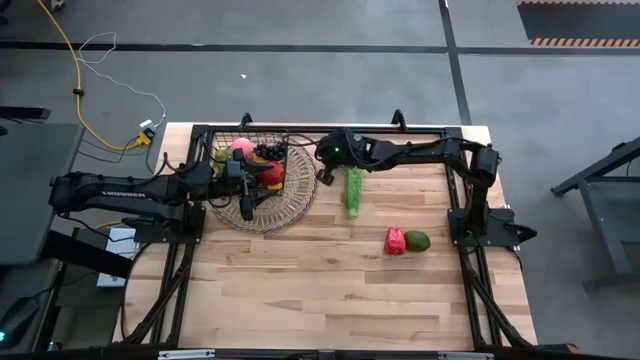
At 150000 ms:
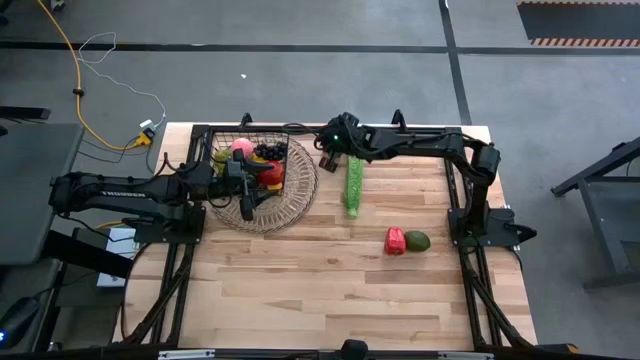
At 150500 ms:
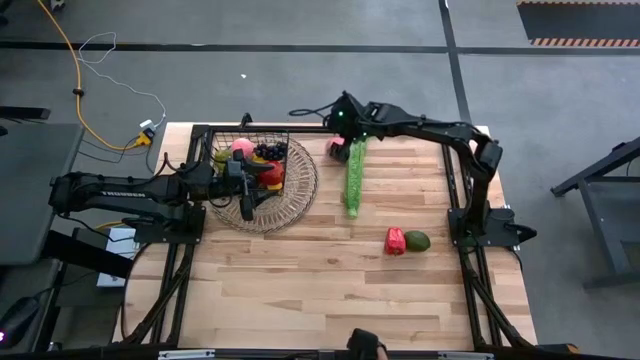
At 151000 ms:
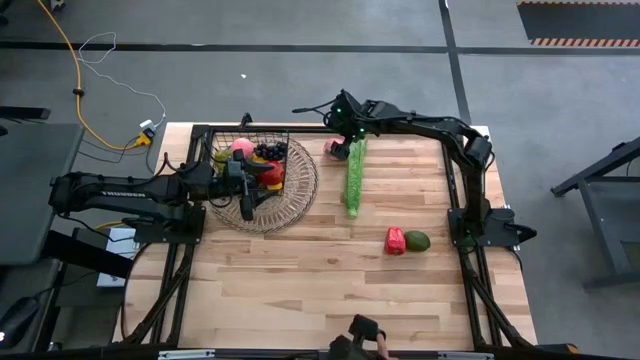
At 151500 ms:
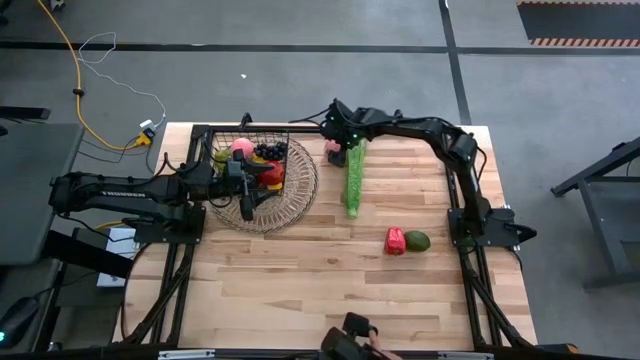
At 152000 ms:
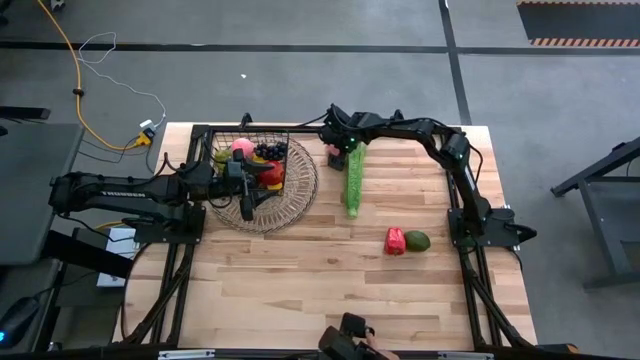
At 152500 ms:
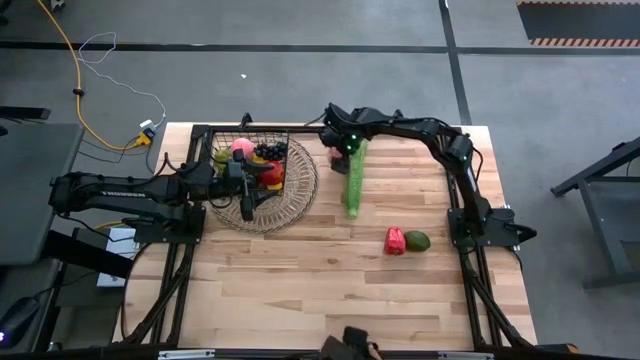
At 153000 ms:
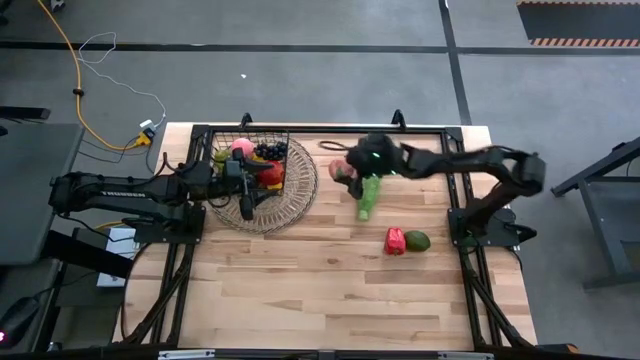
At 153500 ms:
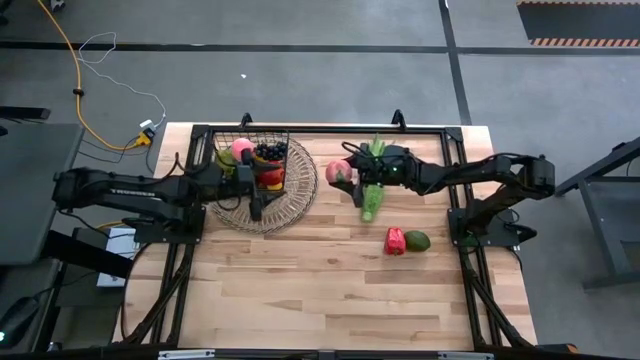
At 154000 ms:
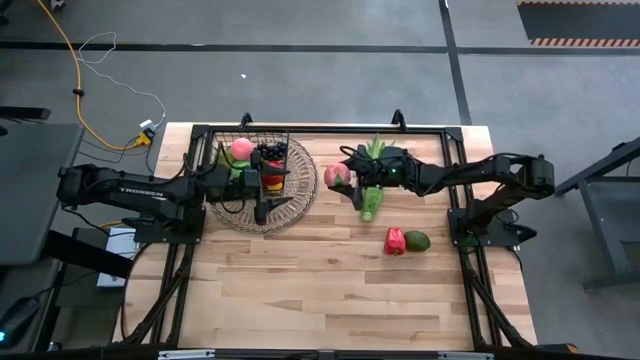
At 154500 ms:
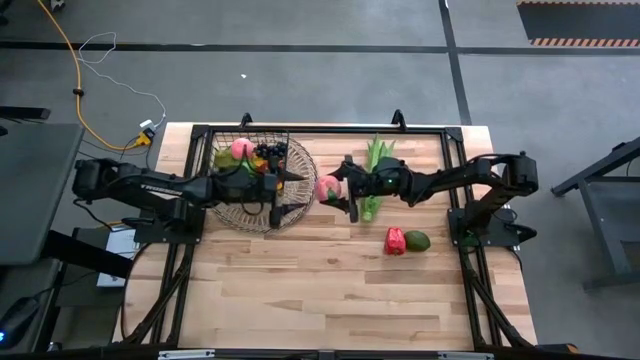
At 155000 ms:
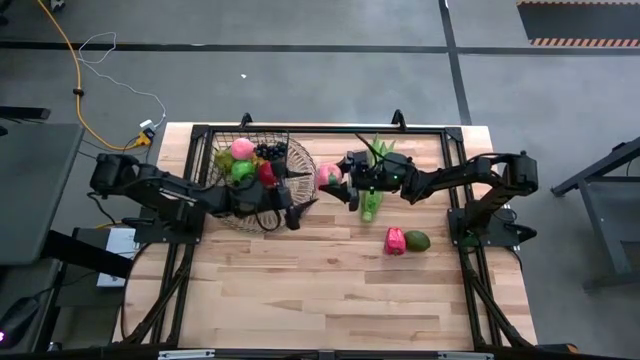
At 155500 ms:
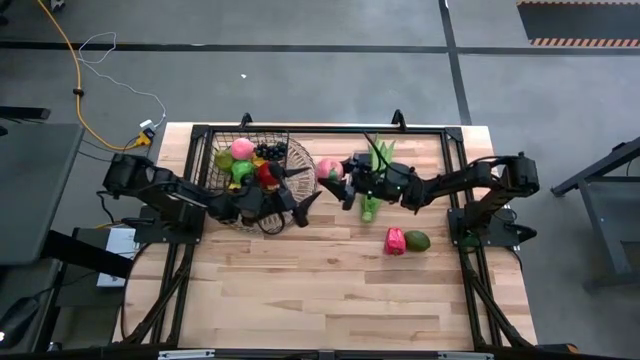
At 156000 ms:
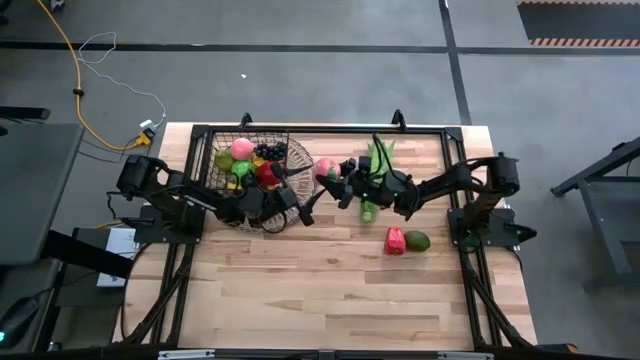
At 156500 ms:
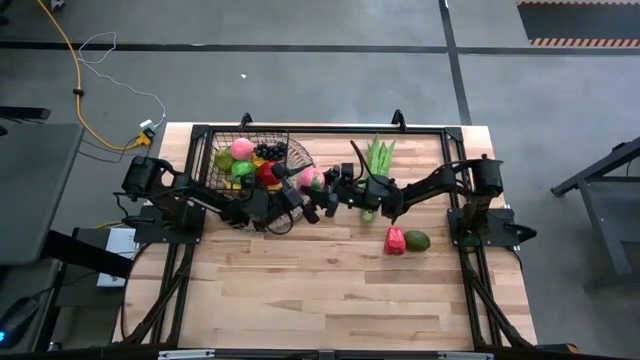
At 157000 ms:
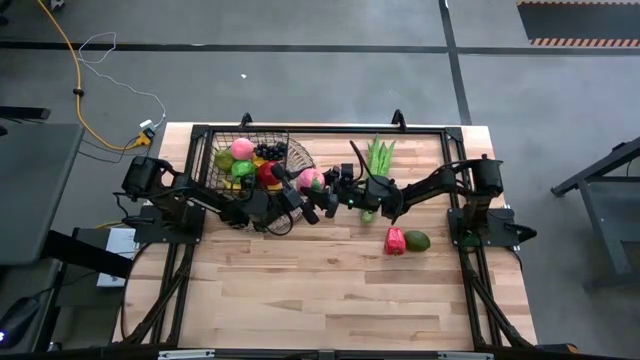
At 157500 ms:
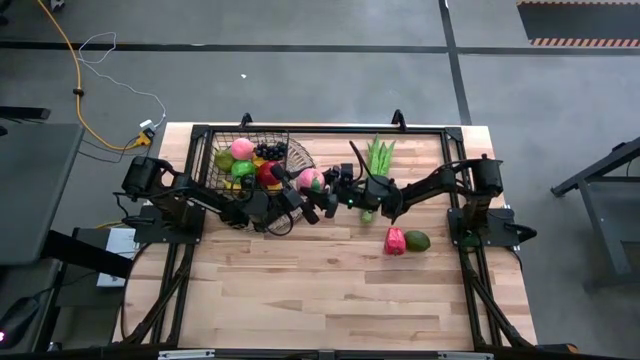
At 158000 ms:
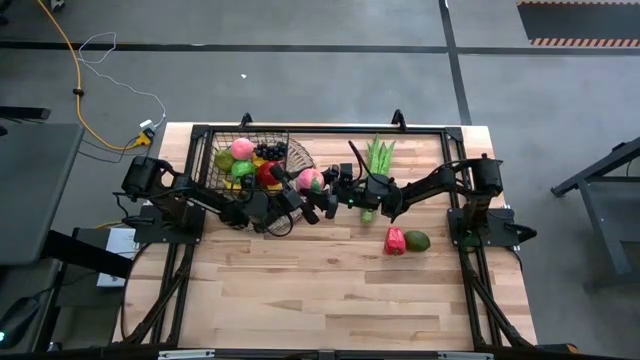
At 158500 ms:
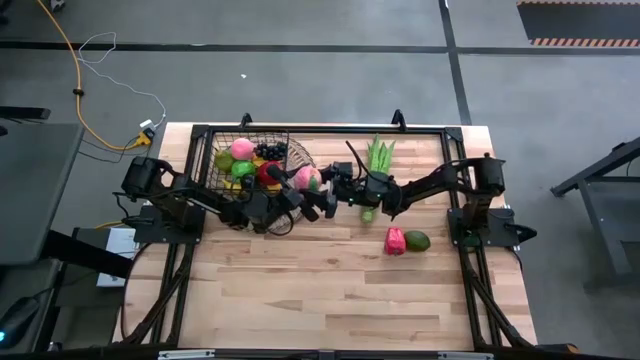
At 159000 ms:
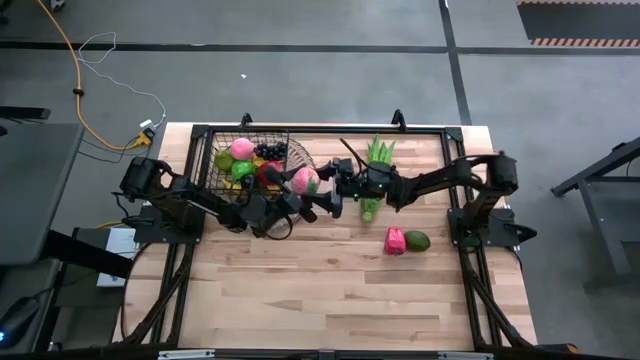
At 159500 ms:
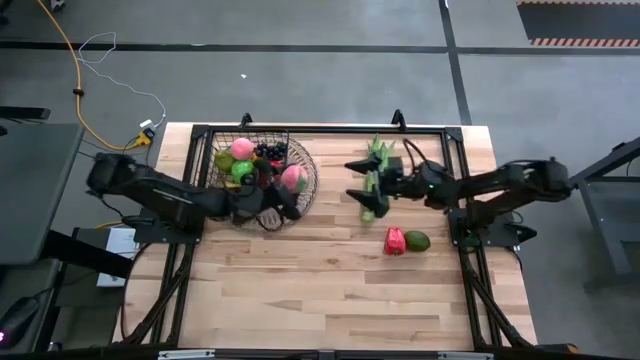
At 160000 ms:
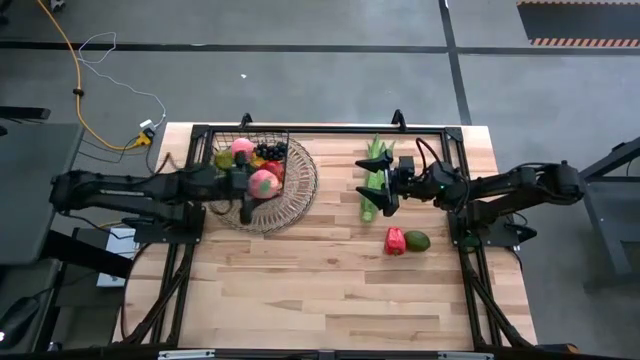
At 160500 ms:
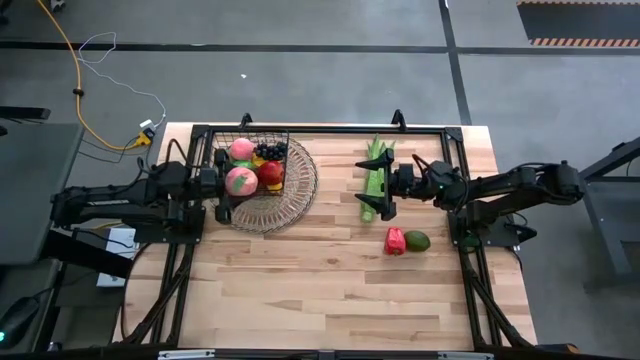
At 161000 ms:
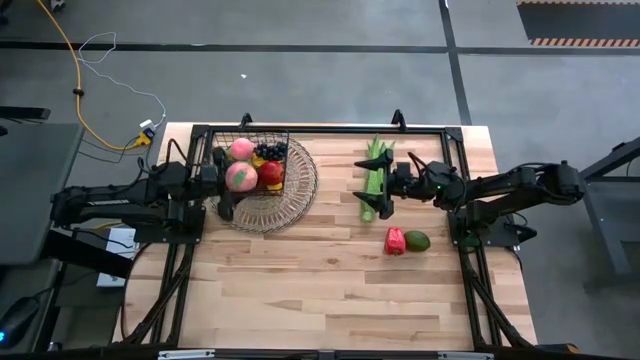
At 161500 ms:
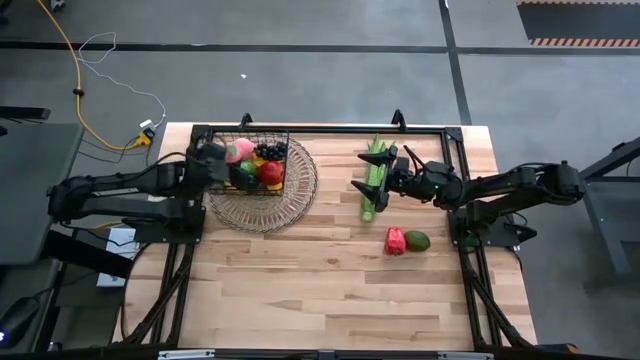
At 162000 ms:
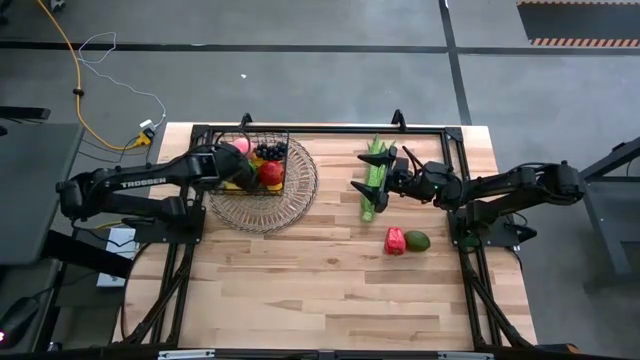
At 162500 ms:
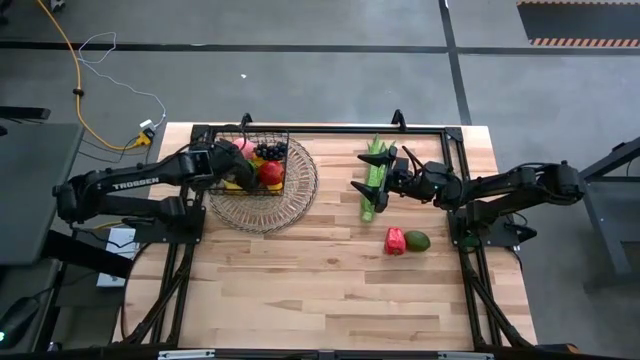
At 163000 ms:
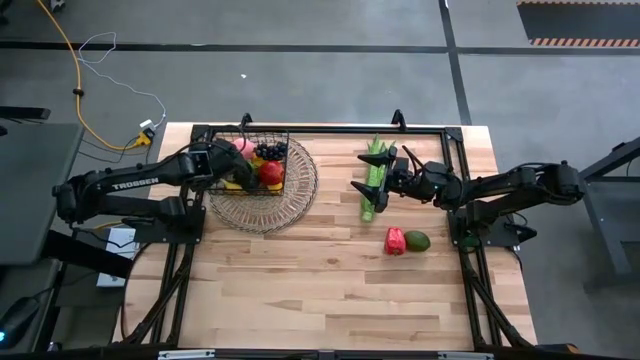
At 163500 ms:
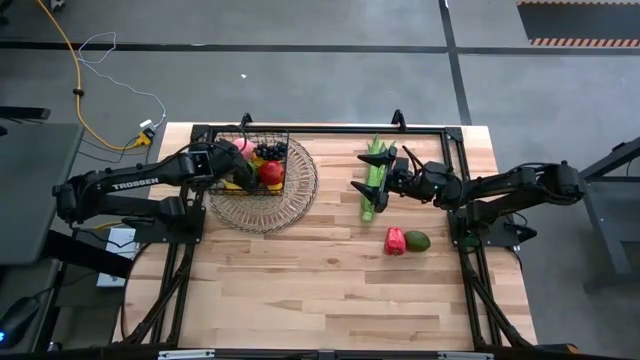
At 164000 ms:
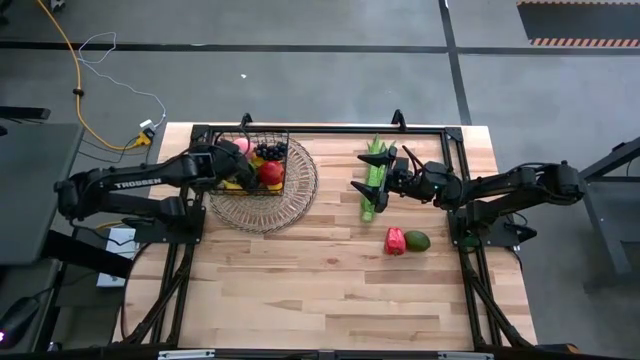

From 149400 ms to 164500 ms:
Task: Build produce basket
Put the pink peach into the black wire basket

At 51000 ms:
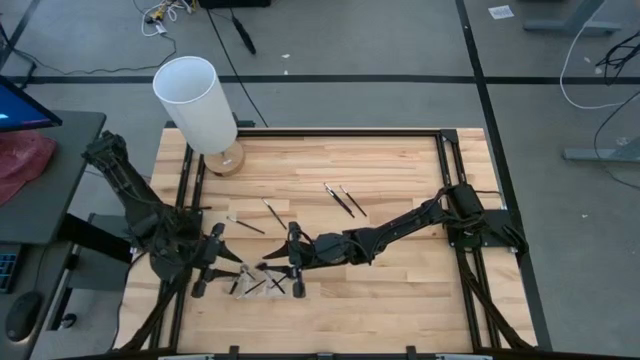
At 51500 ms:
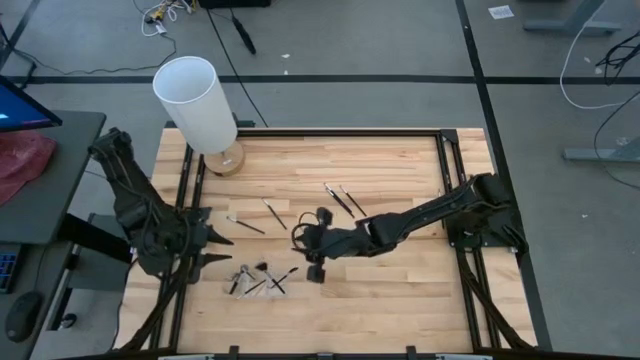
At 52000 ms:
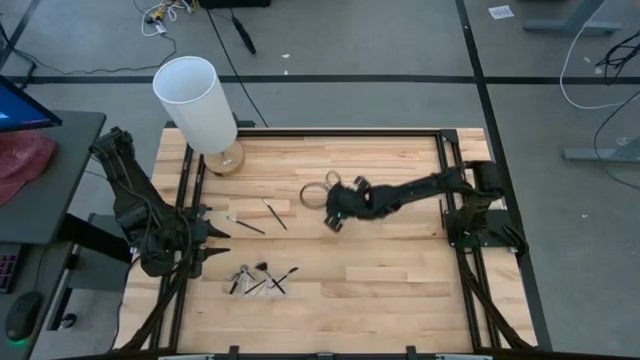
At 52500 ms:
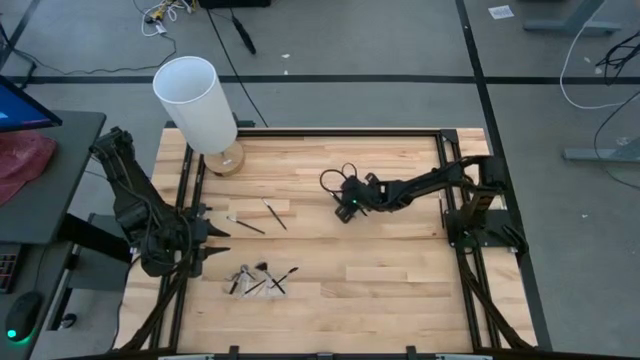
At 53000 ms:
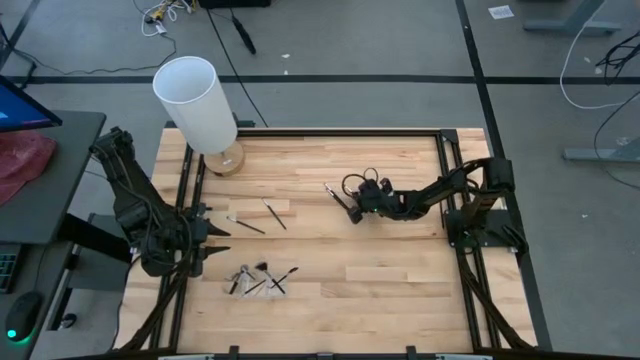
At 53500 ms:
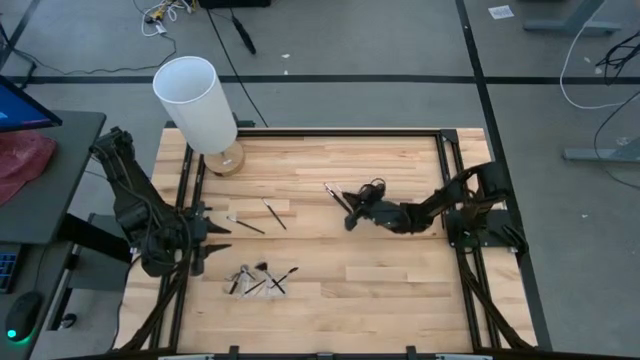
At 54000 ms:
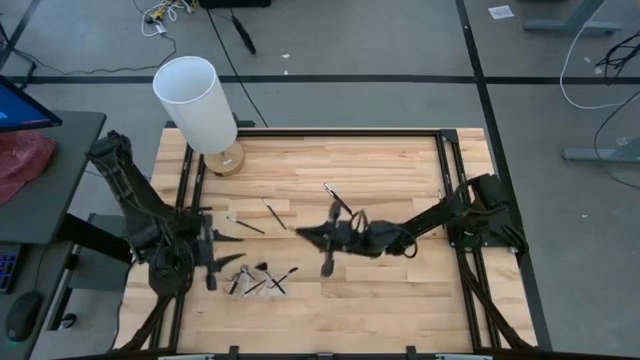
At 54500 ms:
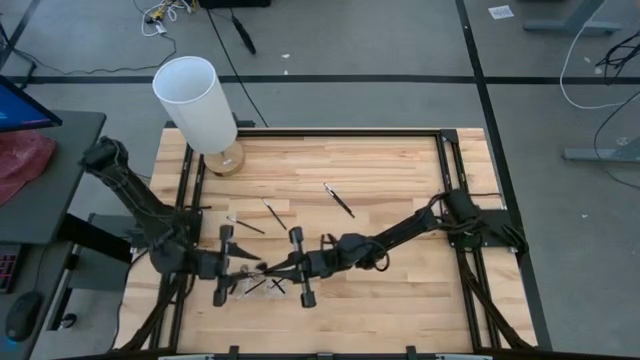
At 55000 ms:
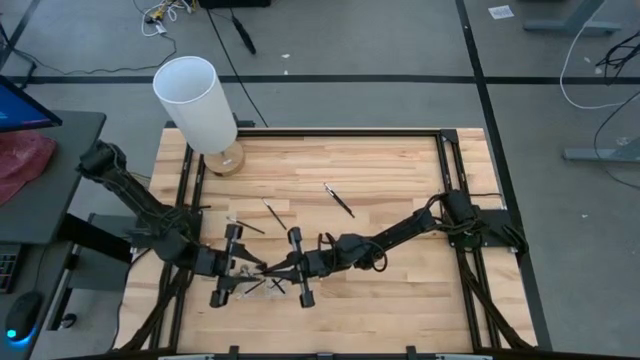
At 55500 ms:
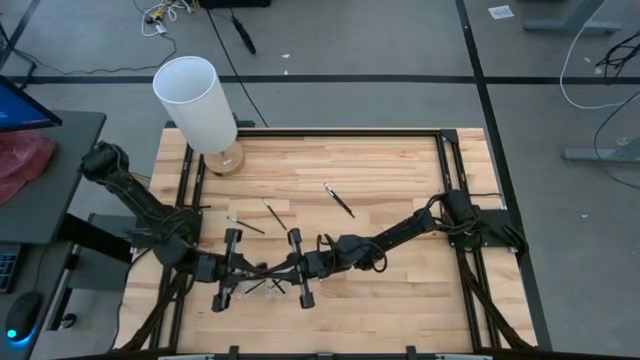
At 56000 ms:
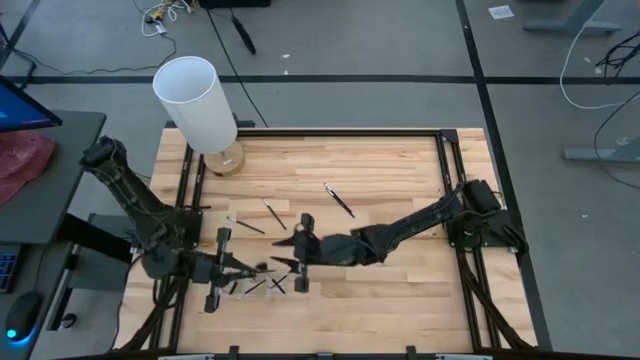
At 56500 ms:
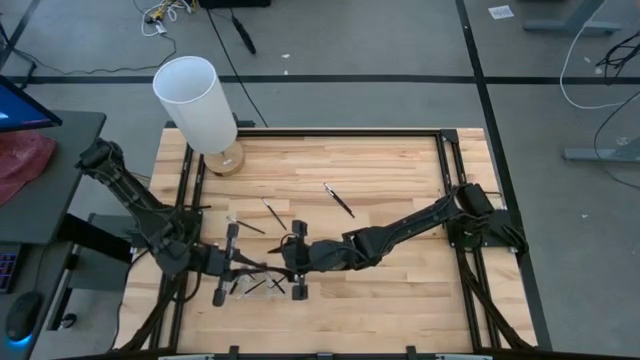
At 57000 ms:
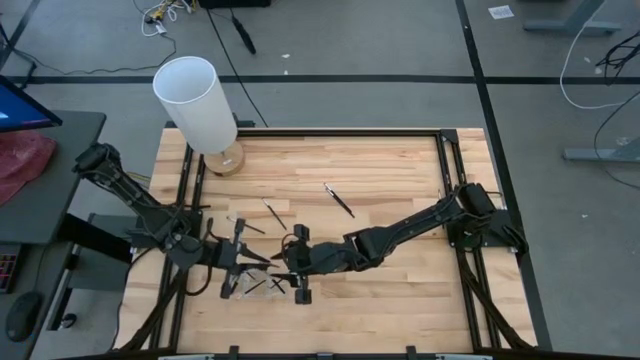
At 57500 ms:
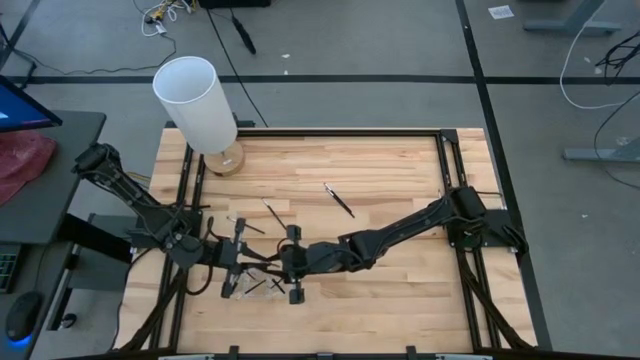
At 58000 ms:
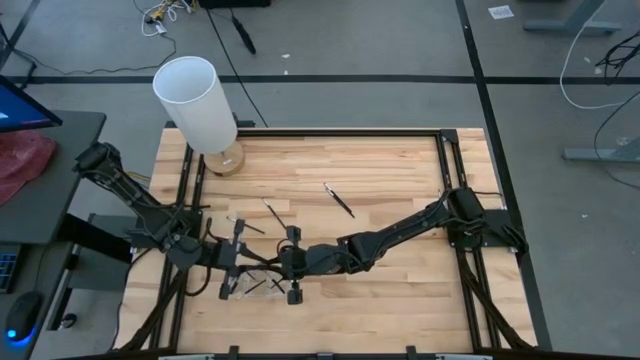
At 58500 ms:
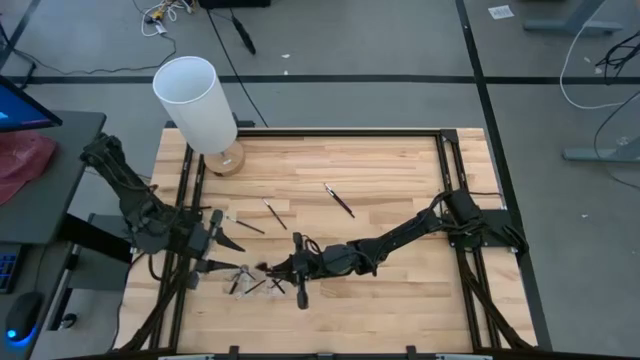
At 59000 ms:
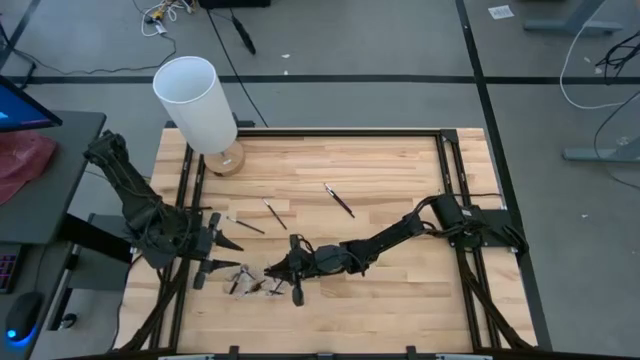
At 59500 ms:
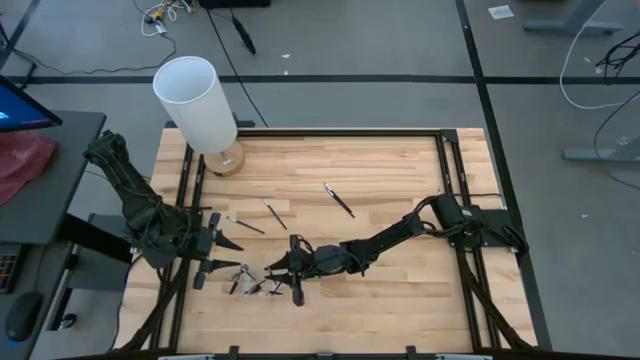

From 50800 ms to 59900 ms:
Task: Put items in baskets/containers
Put the eyeshadow brush into the transparent organizer
